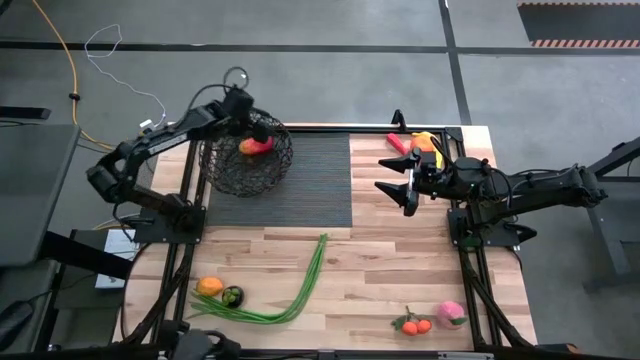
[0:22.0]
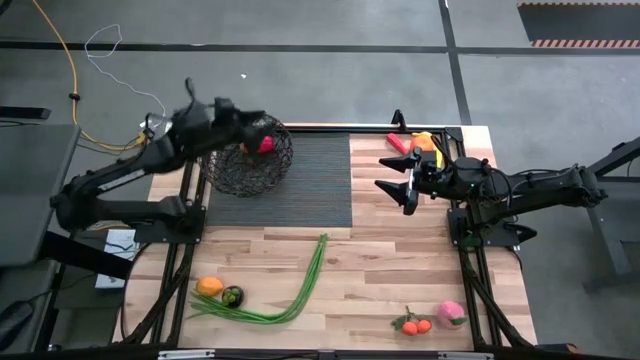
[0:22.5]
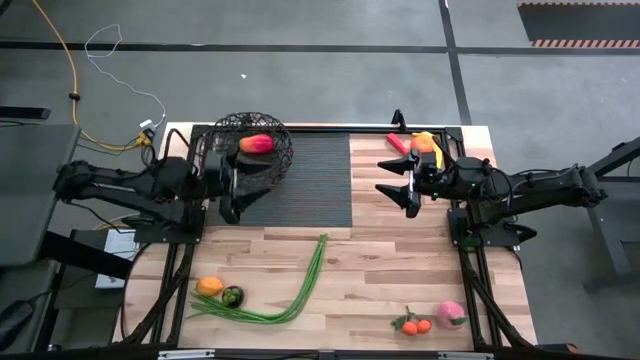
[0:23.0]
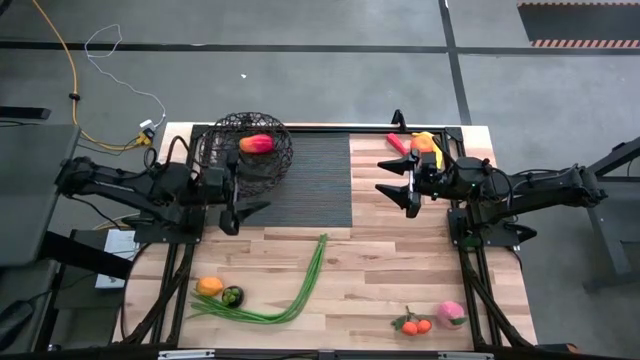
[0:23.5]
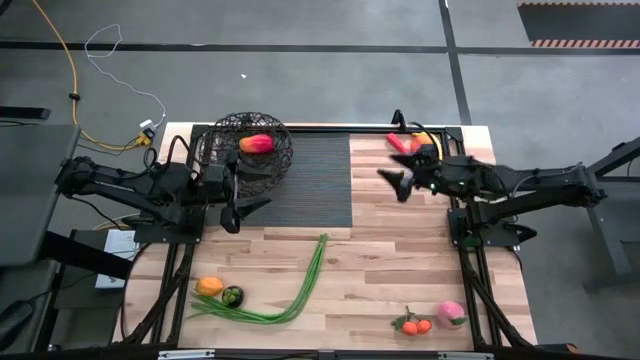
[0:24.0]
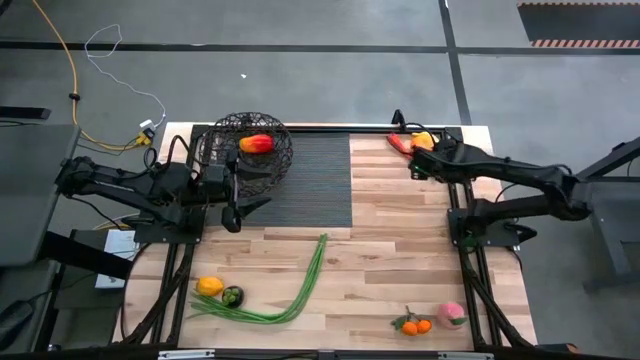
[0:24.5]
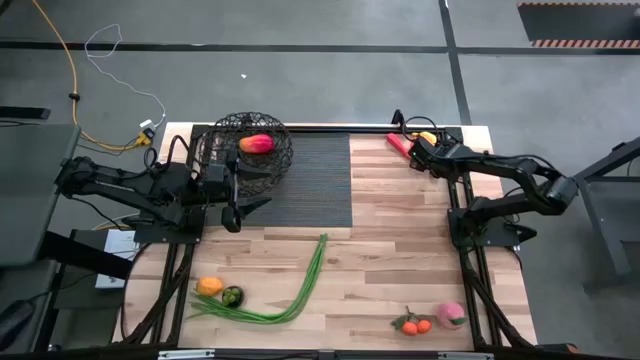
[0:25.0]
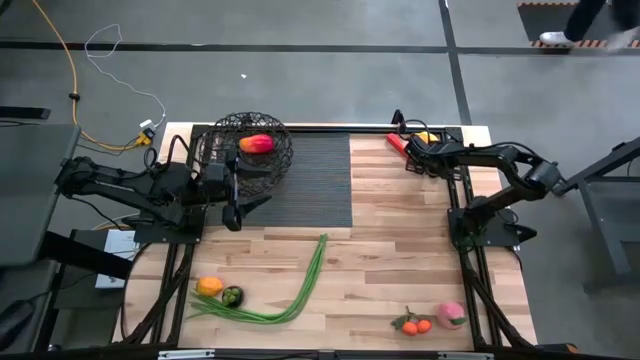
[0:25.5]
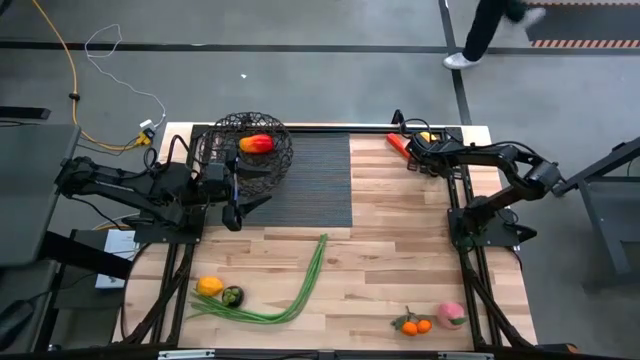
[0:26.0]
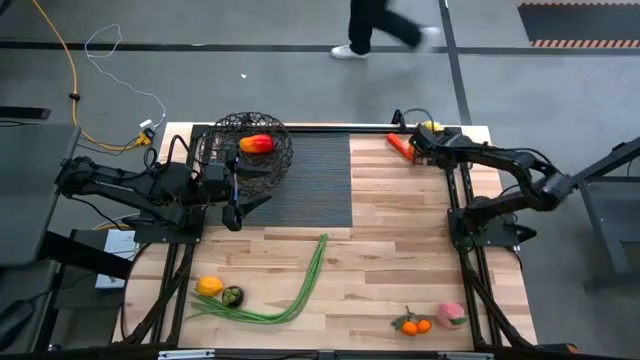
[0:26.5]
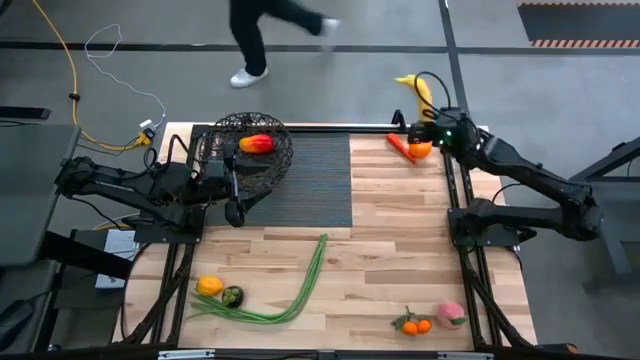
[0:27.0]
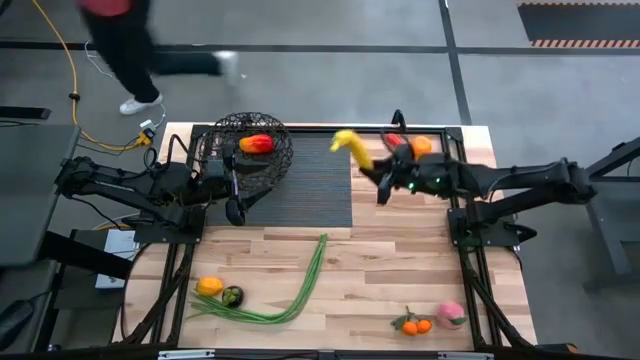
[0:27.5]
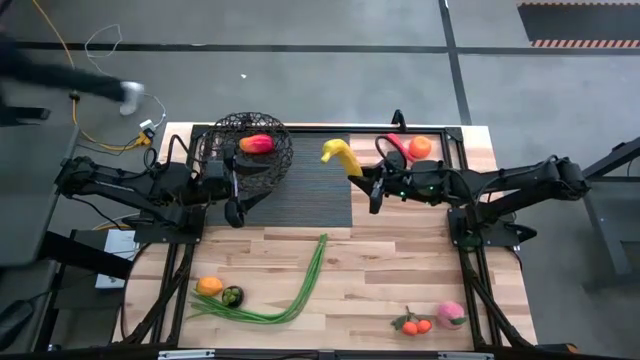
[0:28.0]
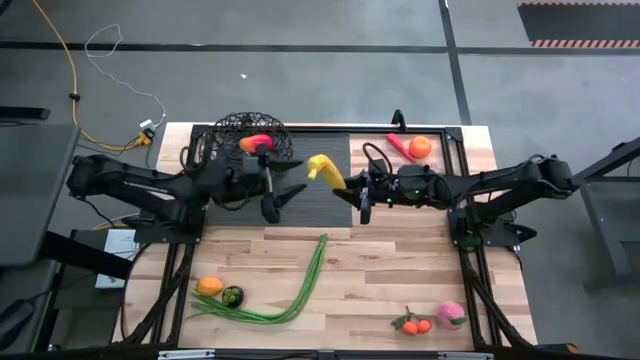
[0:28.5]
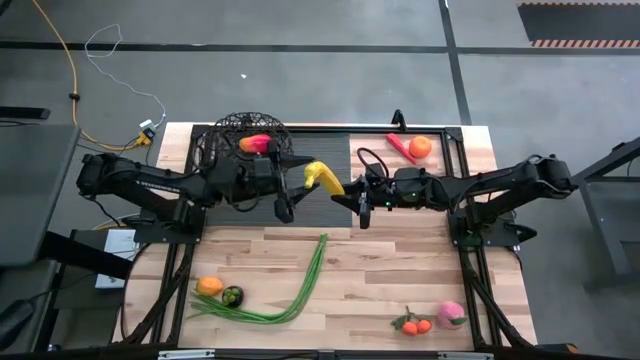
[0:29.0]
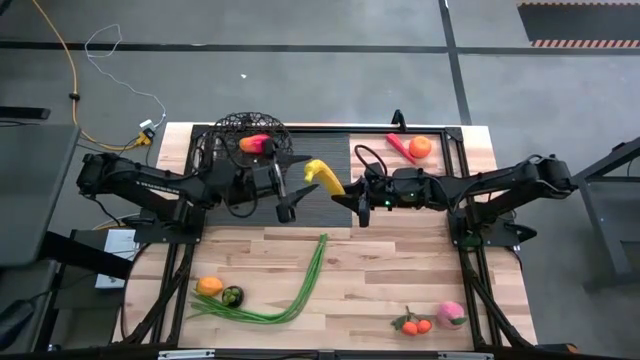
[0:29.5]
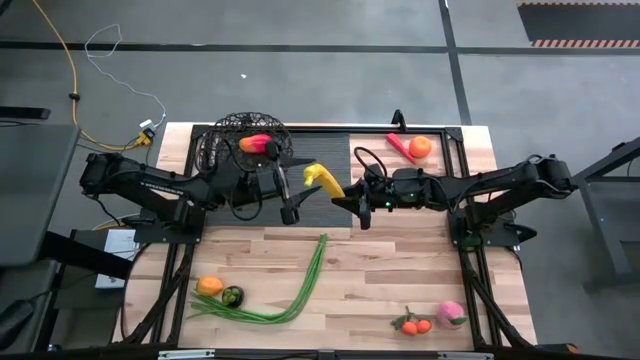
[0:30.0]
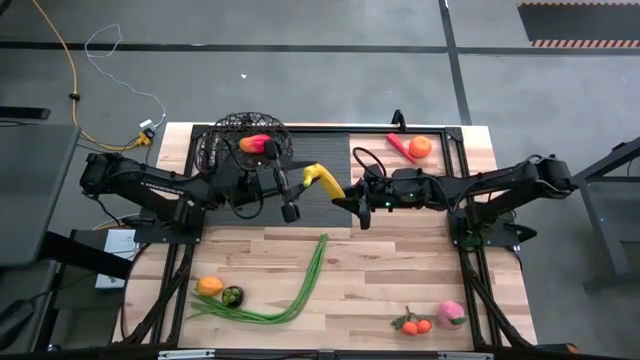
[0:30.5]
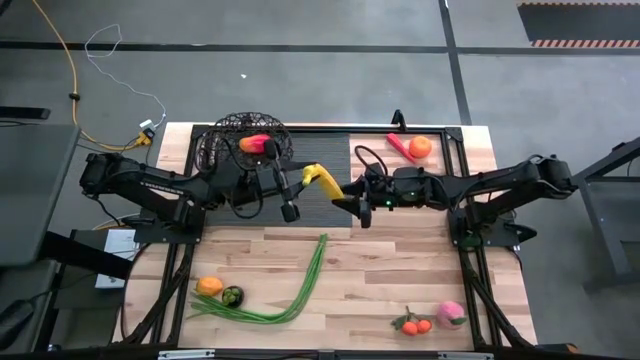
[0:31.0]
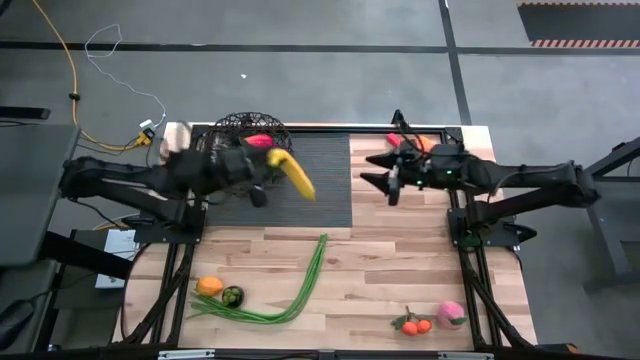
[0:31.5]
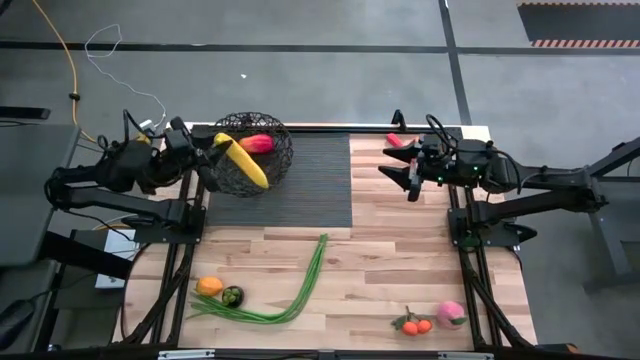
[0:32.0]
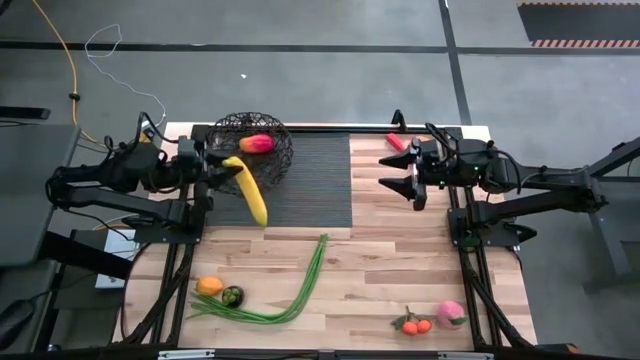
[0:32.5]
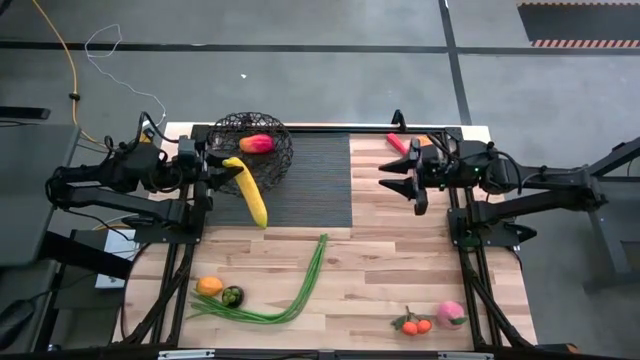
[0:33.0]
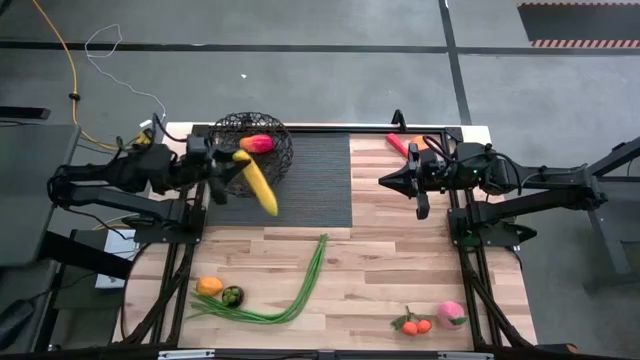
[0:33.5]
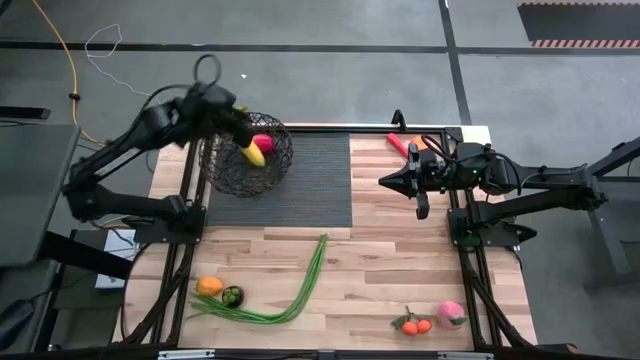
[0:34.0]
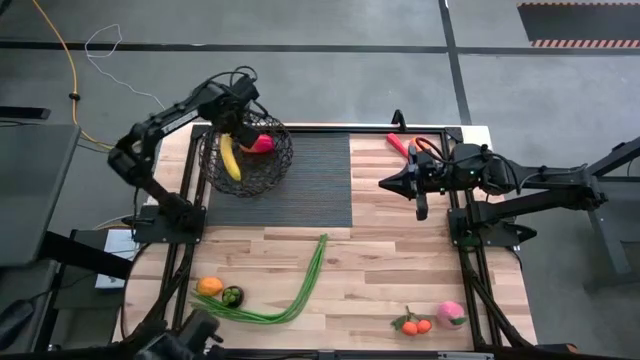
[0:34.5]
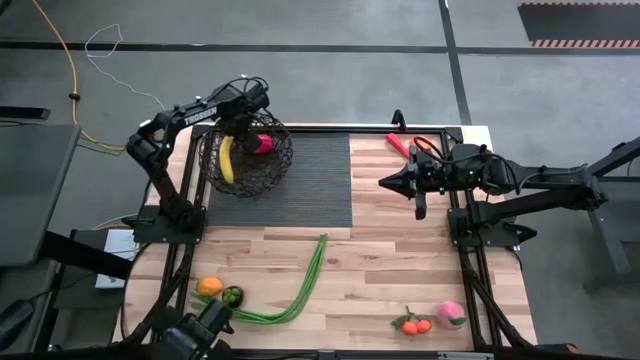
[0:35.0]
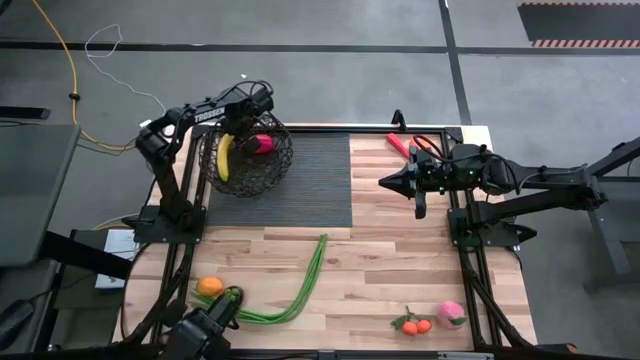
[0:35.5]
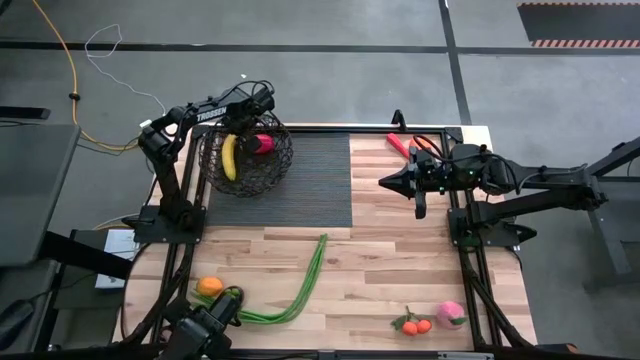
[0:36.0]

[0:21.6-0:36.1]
Task: Build produce basket
Put the yellow banana into the black basket
